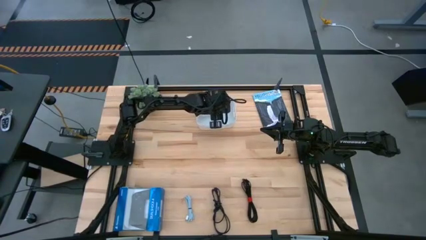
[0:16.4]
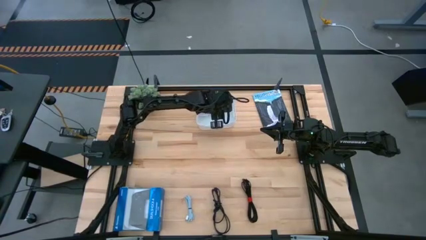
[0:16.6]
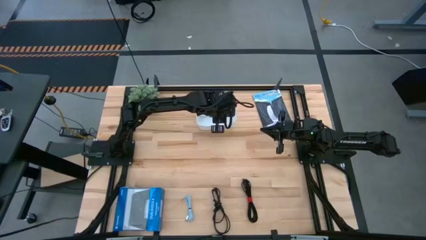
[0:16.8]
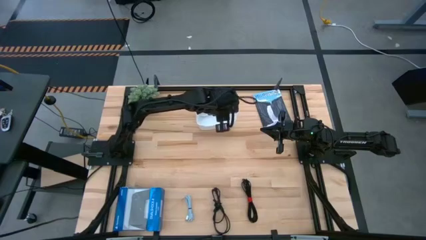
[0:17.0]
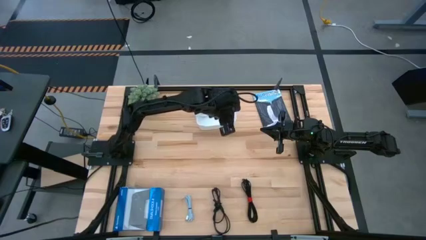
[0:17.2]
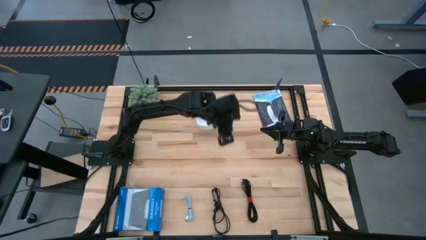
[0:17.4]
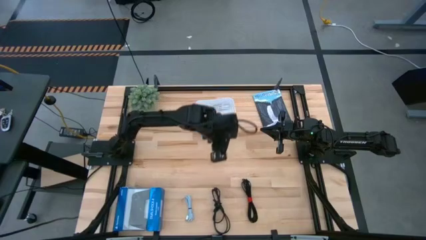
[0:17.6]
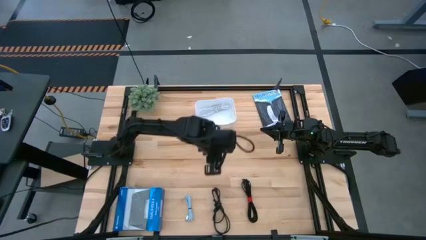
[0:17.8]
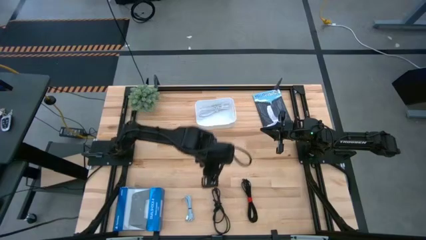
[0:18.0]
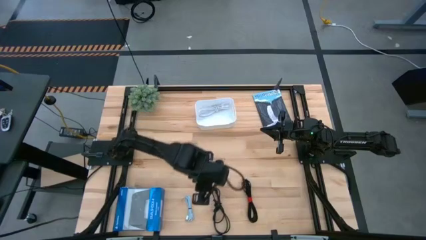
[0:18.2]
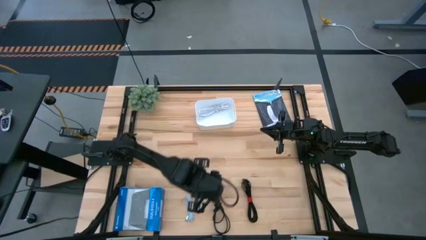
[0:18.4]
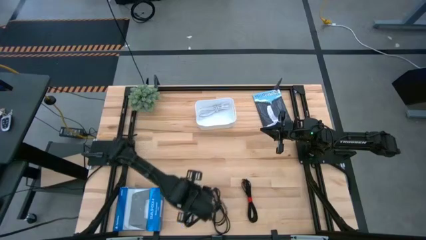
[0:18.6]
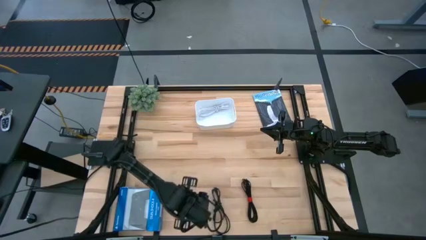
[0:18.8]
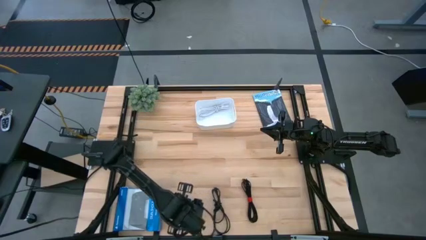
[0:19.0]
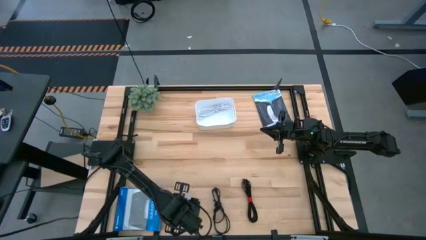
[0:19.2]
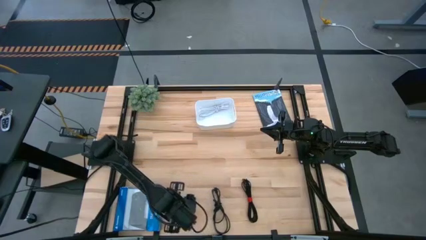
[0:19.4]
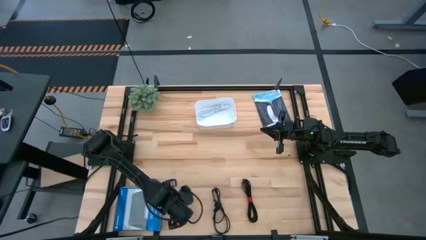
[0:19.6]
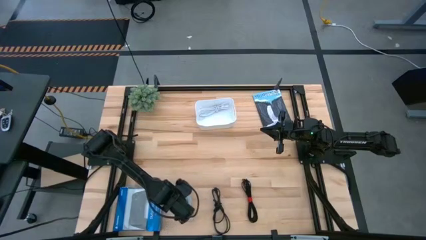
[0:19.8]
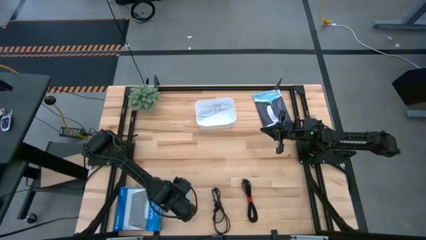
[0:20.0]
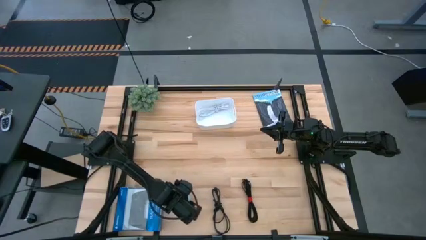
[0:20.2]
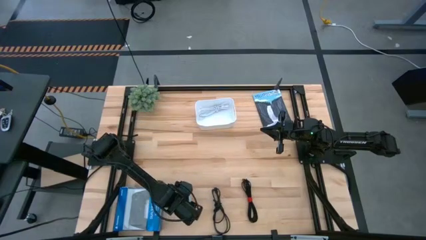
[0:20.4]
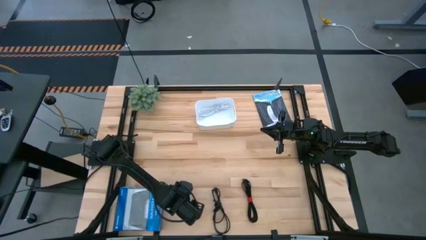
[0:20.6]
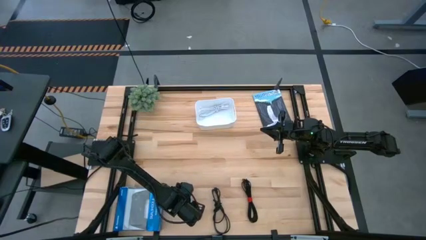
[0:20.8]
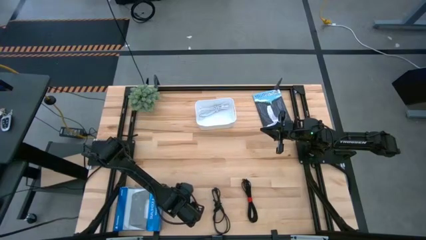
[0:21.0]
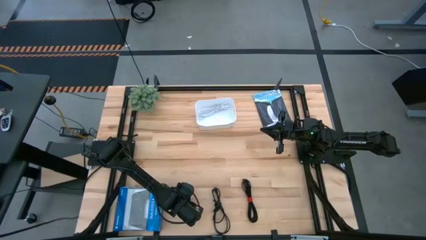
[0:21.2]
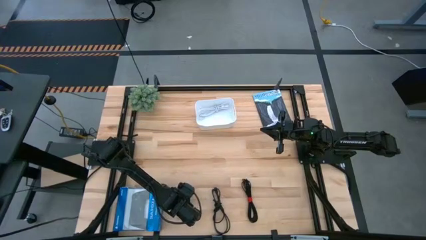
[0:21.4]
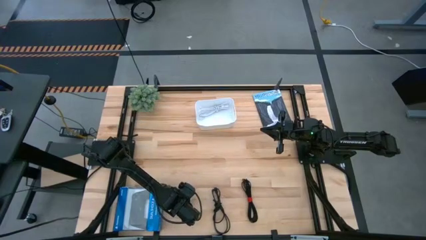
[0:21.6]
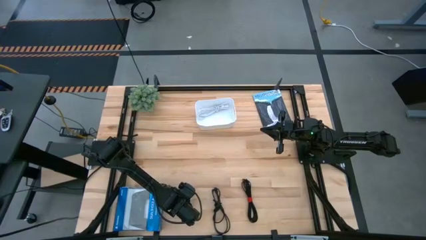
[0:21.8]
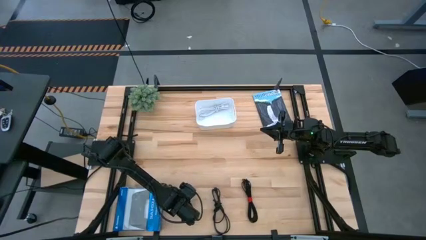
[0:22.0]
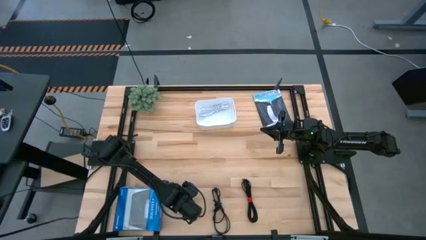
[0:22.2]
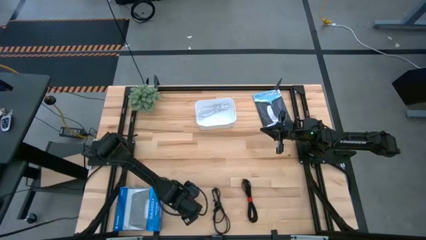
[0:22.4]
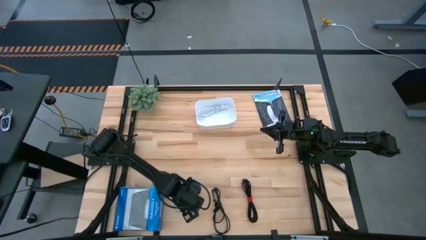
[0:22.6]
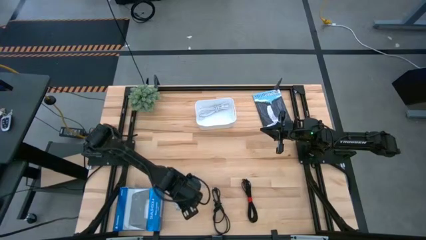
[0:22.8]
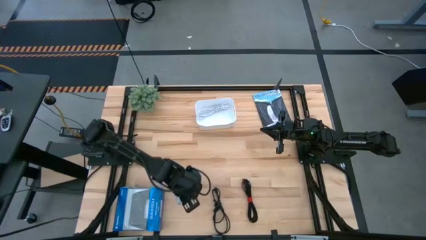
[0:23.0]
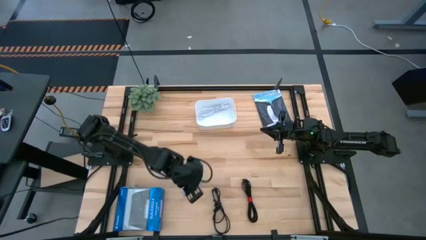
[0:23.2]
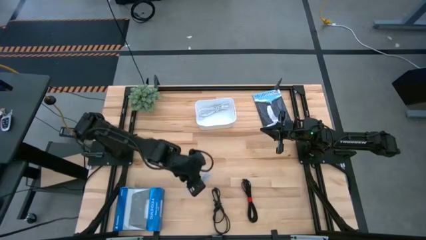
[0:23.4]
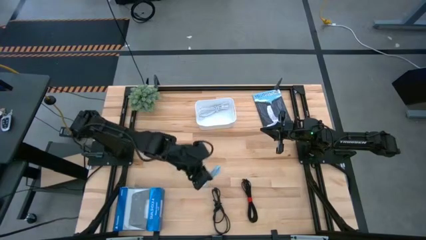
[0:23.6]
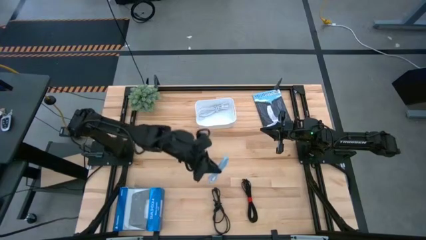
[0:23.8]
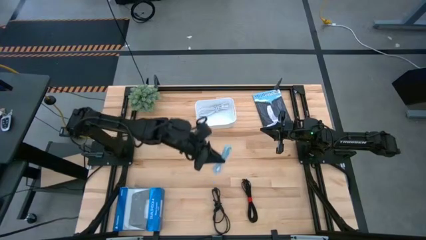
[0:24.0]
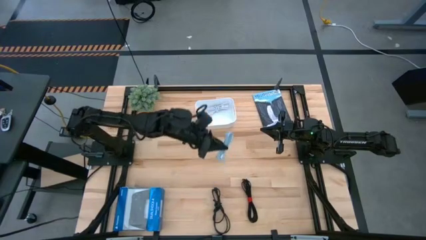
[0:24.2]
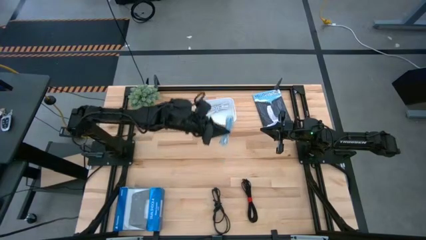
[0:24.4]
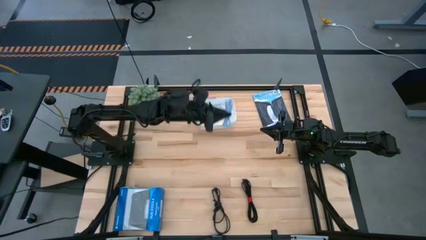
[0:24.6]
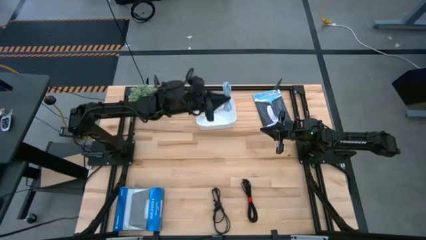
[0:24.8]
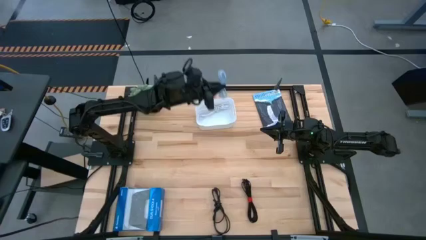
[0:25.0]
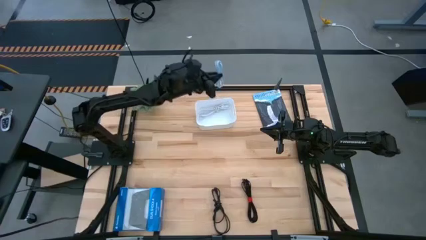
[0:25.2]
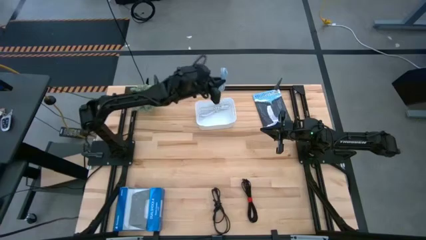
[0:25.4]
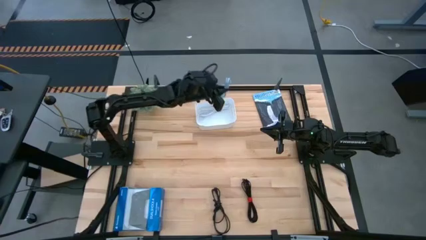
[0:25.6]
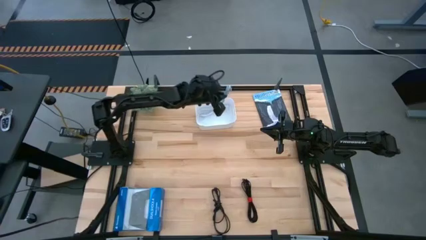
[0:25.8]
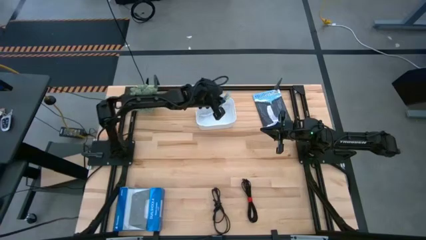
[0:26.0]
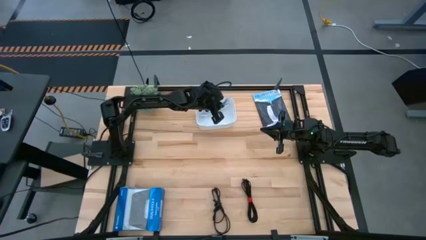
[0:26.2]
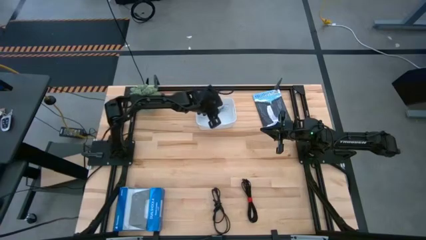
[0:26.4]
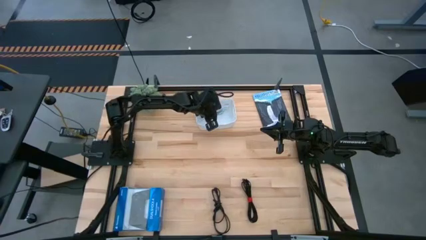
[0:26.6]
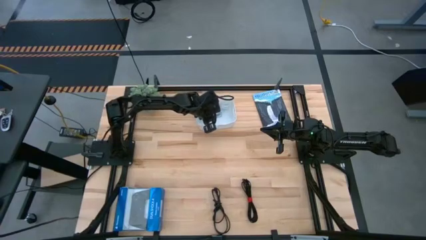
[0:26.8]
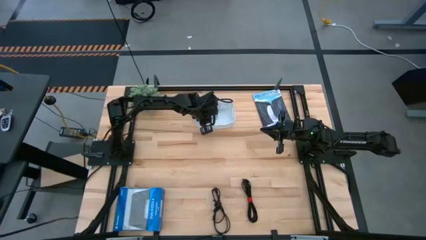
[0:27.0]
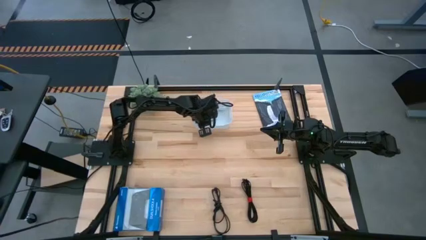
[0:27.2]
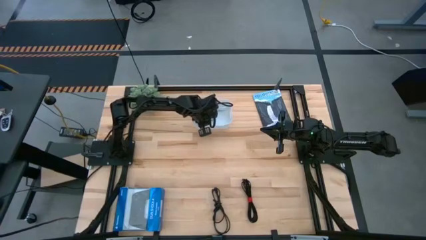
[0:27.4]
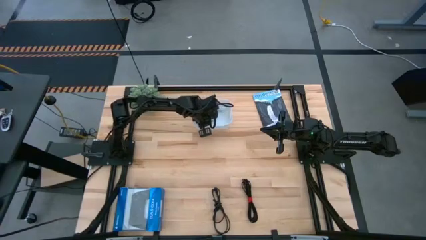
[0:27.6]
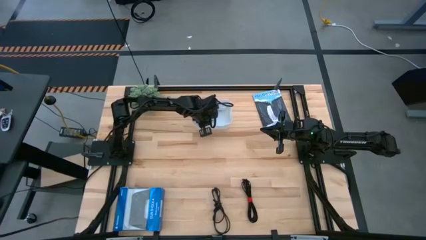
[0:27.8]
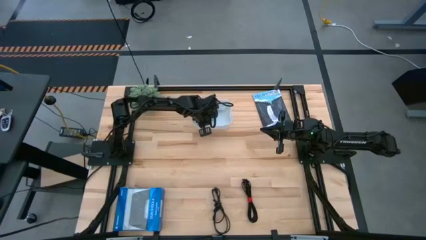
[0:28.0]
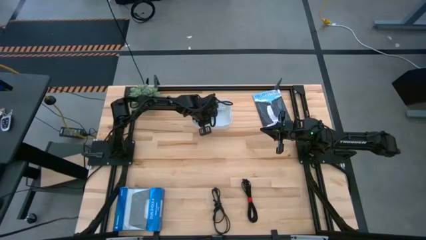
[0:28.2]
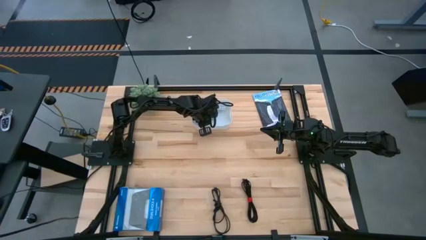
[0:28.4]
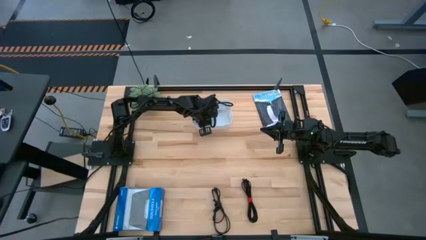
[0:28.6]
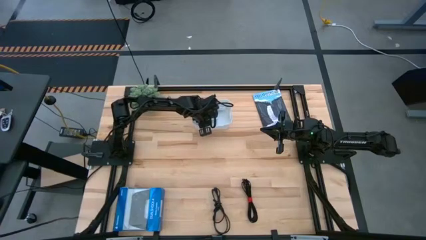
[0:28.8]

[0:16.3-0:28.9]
Task: Pick and place USB-C Cables
Put the light blue charger cable into the white bin
